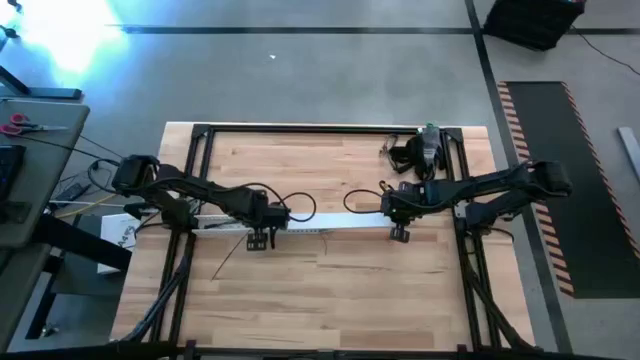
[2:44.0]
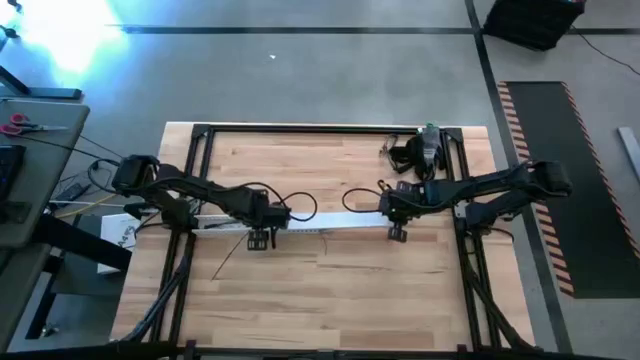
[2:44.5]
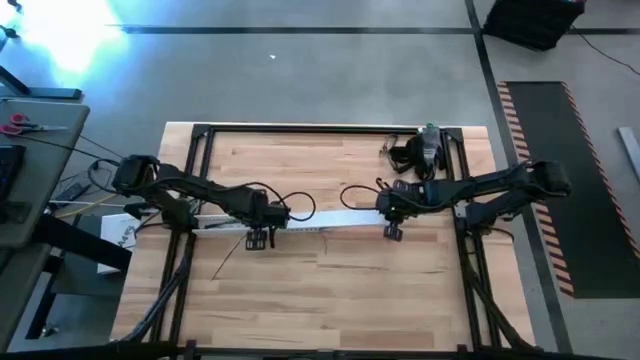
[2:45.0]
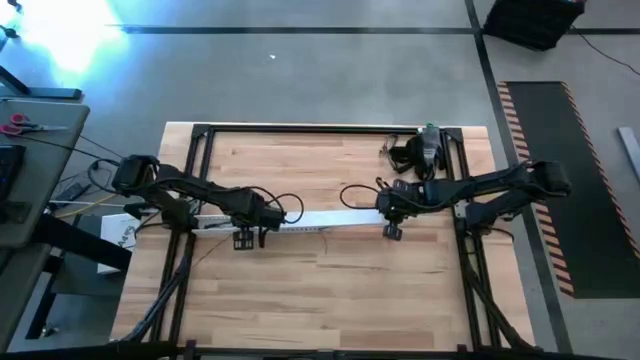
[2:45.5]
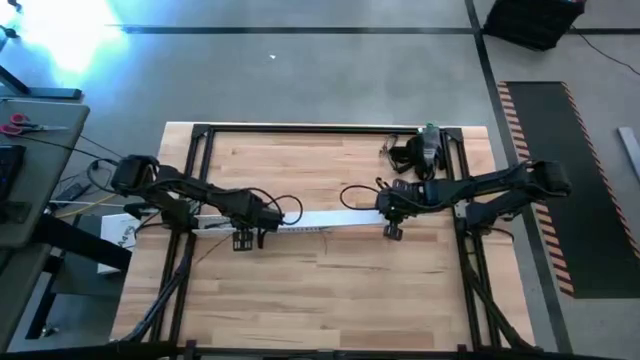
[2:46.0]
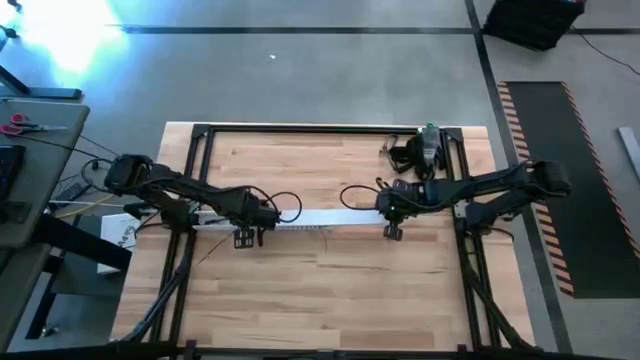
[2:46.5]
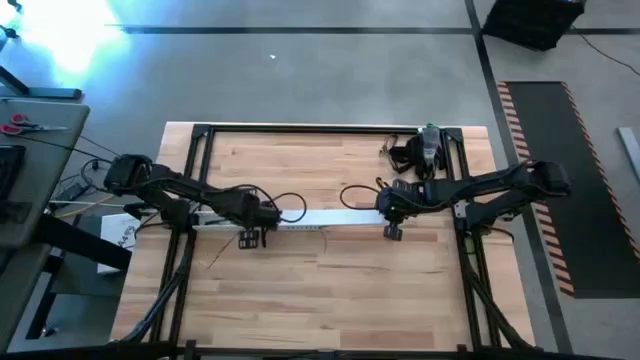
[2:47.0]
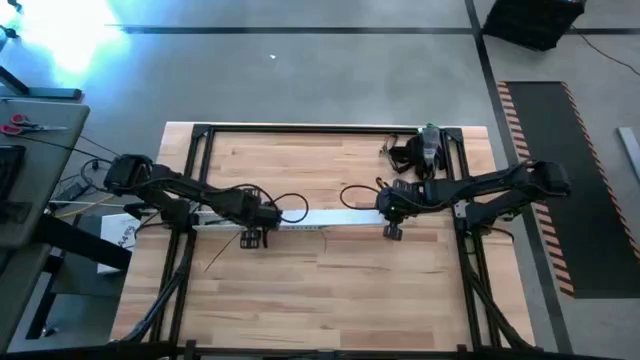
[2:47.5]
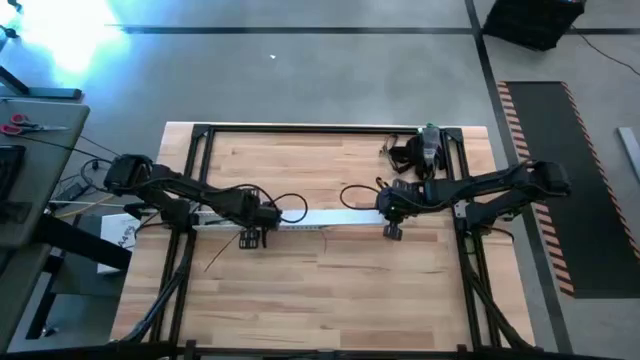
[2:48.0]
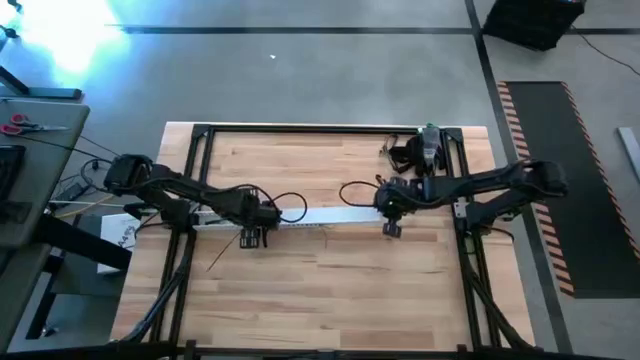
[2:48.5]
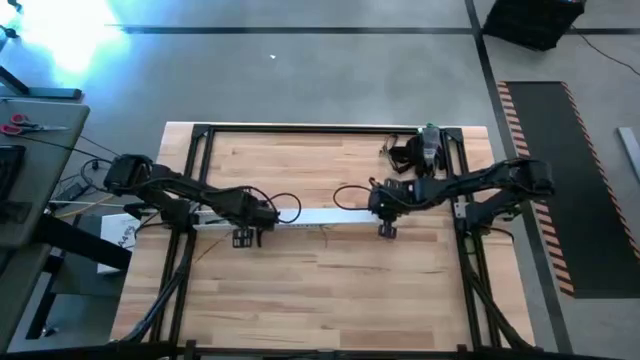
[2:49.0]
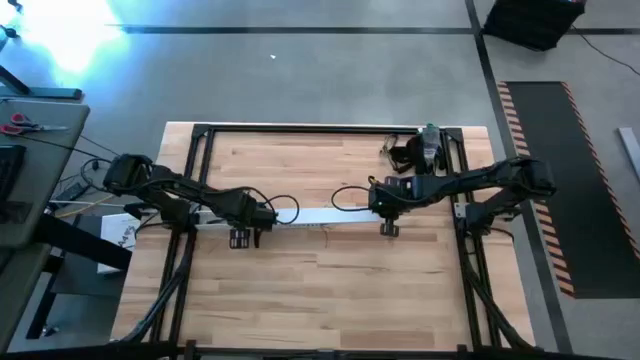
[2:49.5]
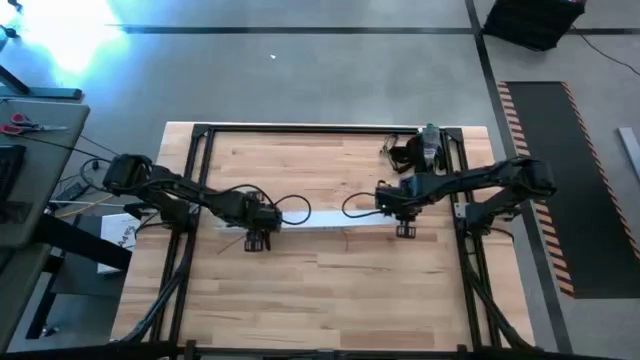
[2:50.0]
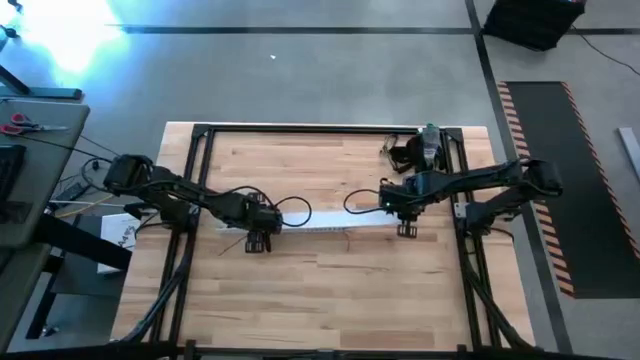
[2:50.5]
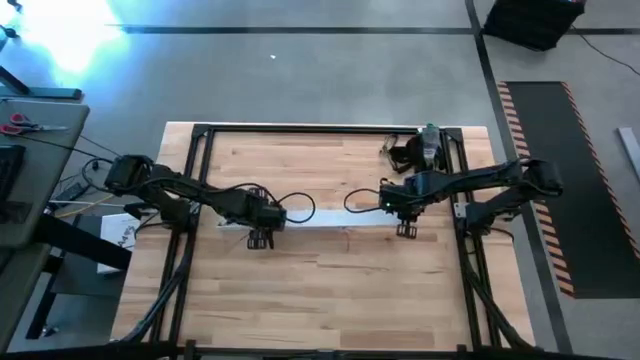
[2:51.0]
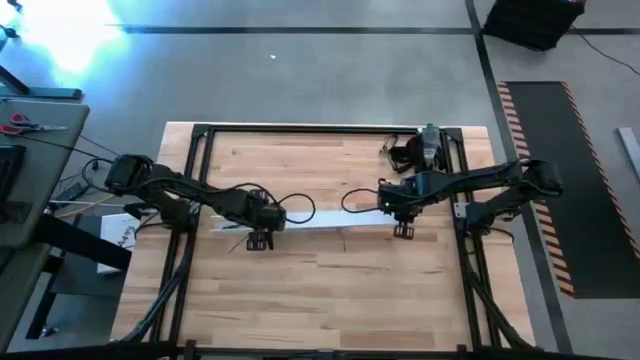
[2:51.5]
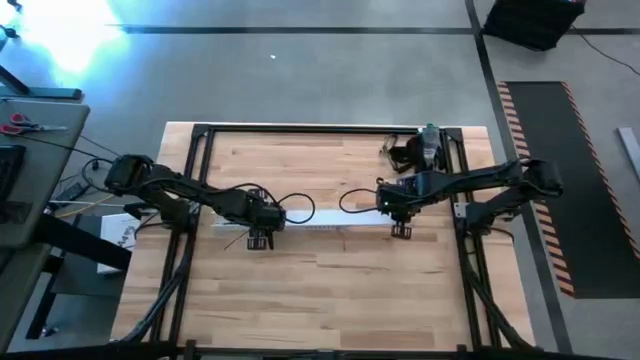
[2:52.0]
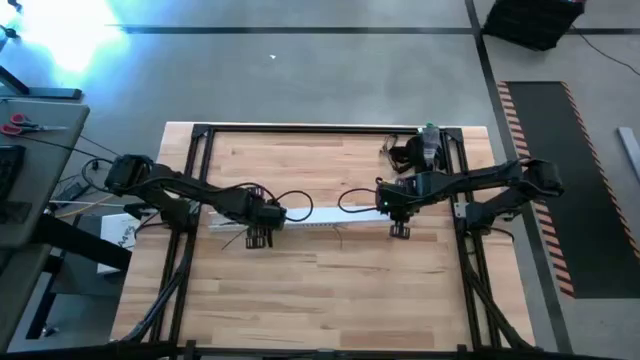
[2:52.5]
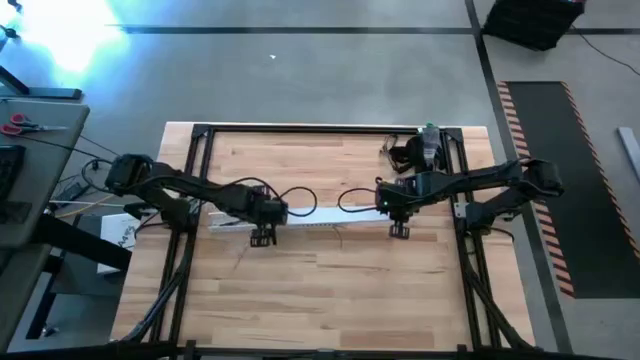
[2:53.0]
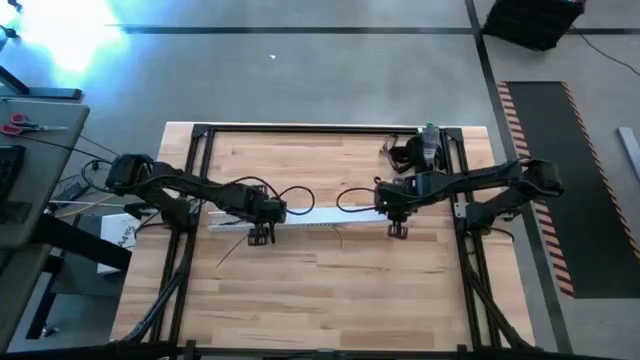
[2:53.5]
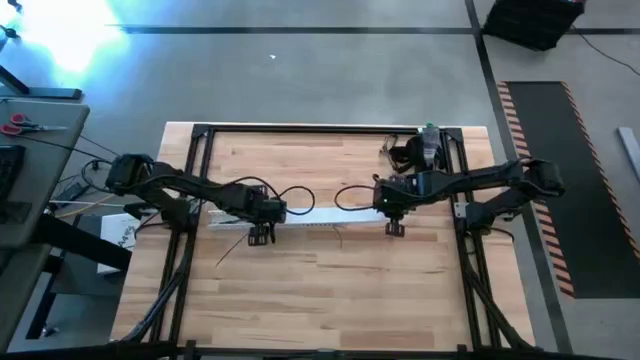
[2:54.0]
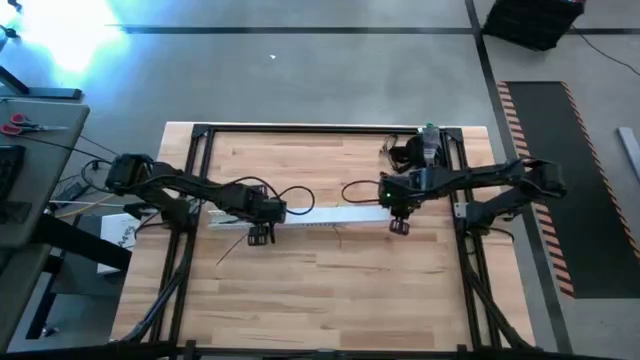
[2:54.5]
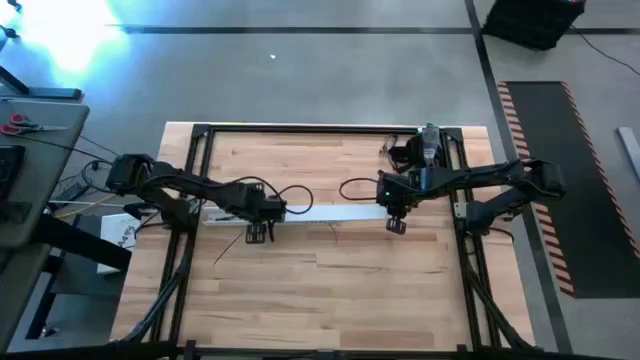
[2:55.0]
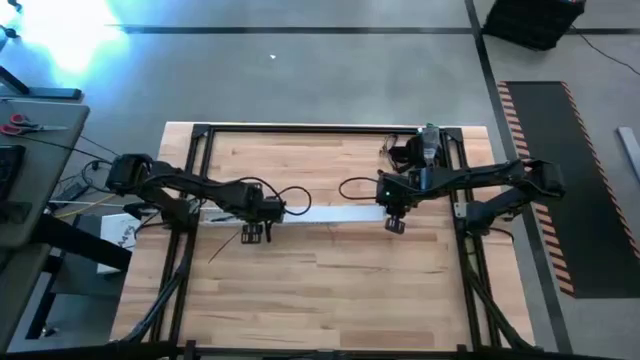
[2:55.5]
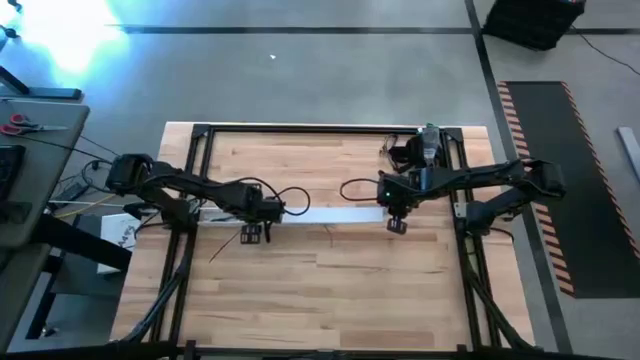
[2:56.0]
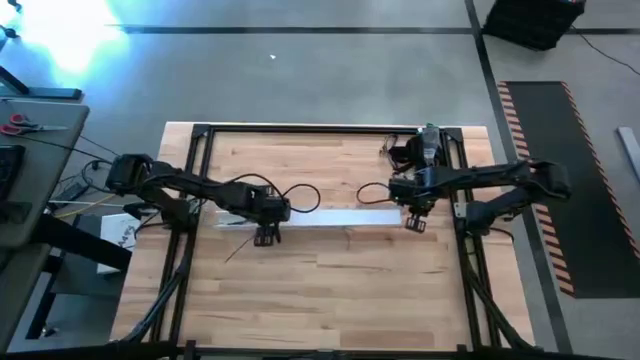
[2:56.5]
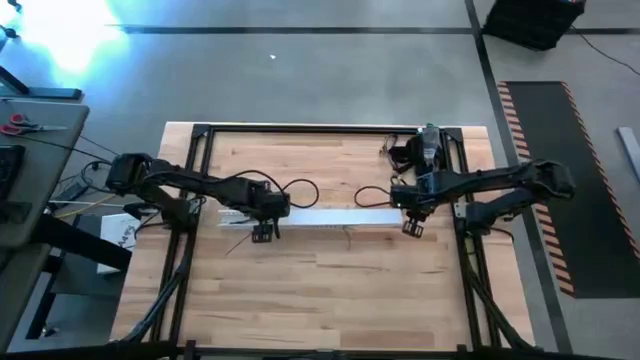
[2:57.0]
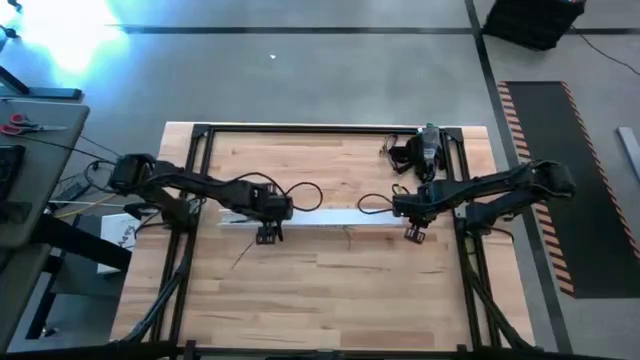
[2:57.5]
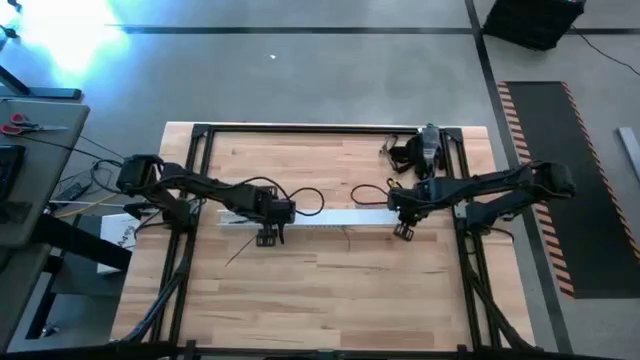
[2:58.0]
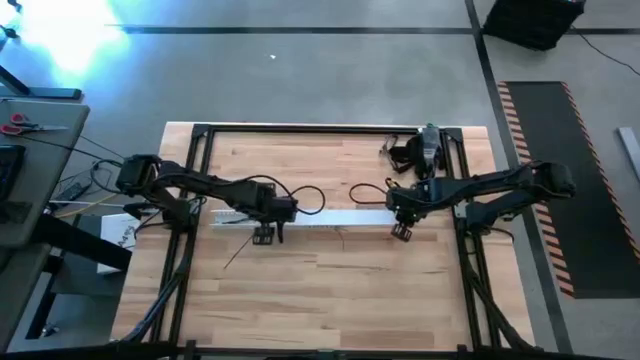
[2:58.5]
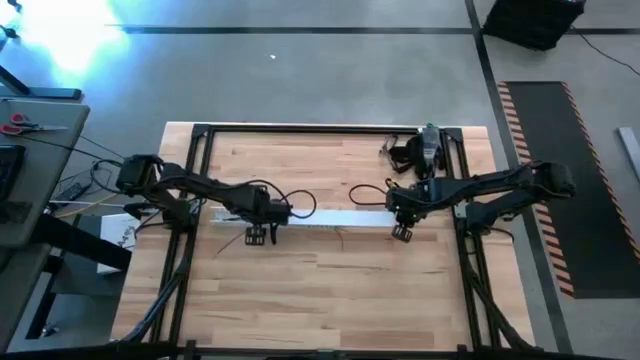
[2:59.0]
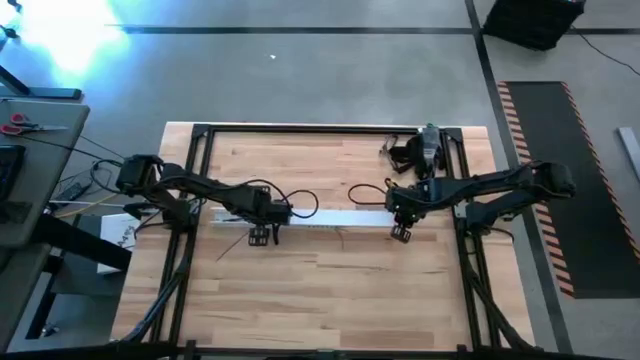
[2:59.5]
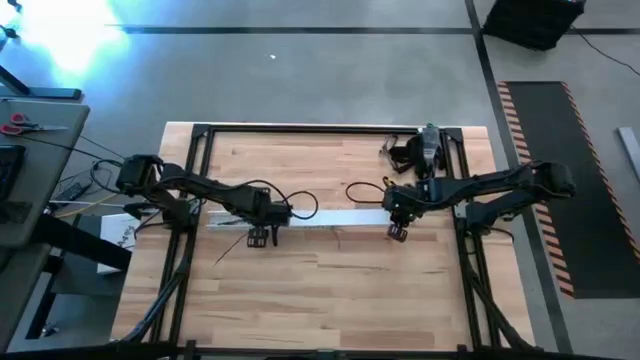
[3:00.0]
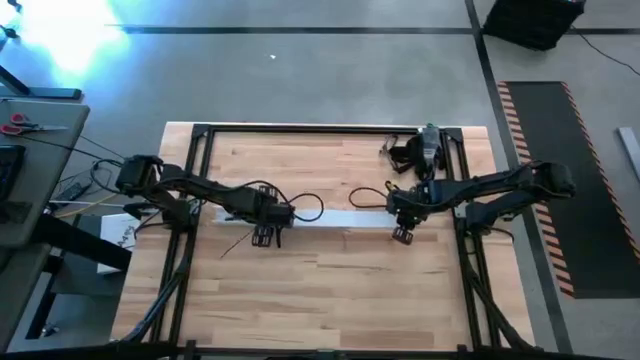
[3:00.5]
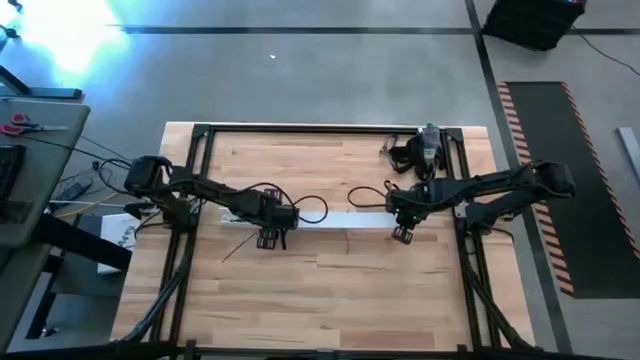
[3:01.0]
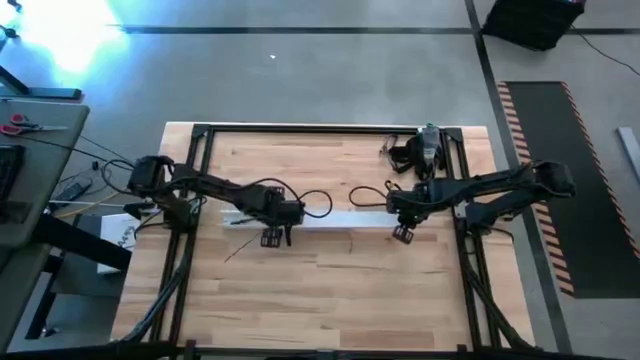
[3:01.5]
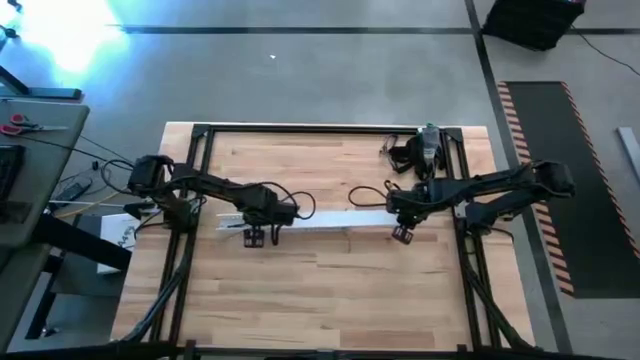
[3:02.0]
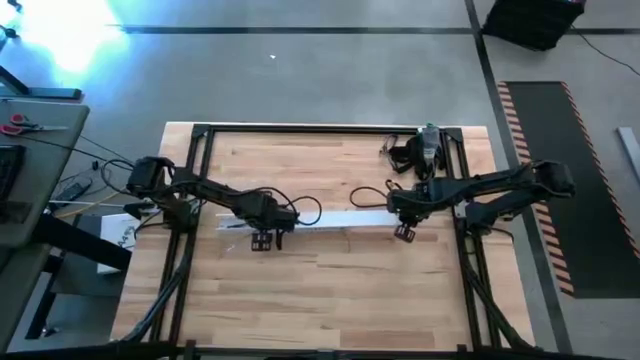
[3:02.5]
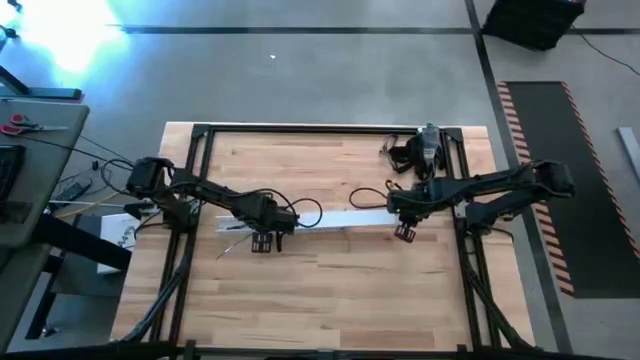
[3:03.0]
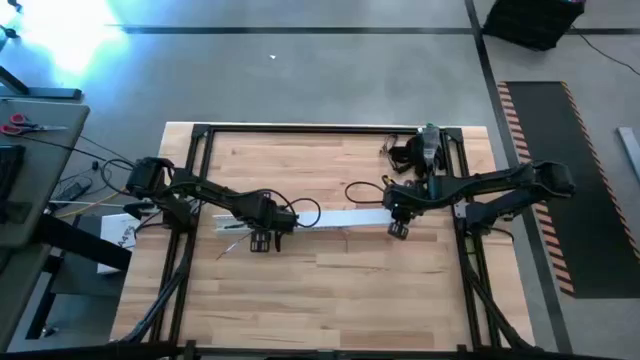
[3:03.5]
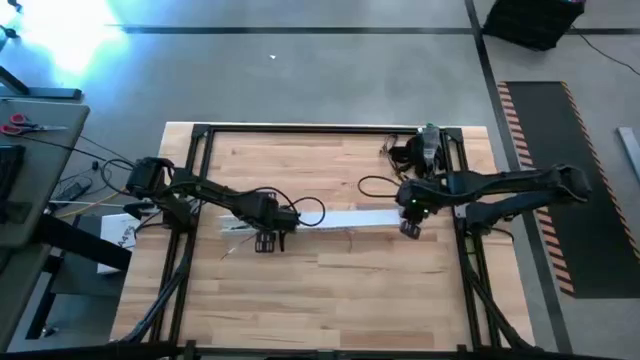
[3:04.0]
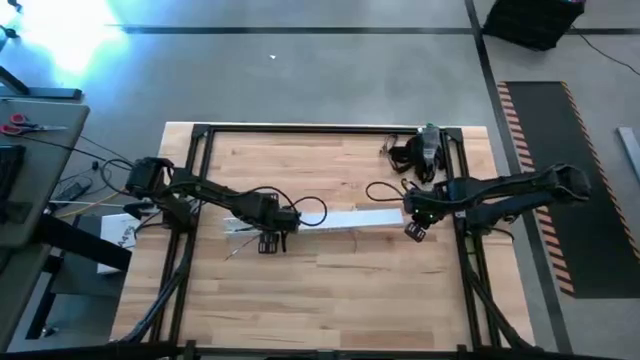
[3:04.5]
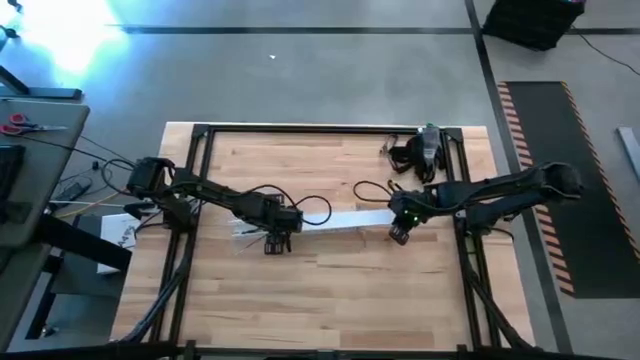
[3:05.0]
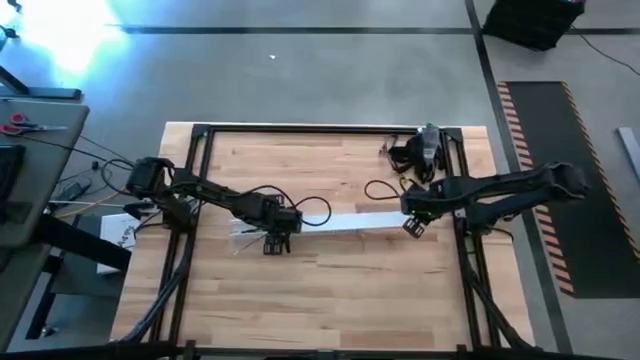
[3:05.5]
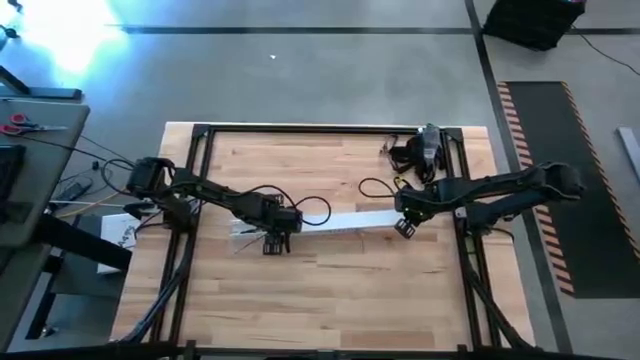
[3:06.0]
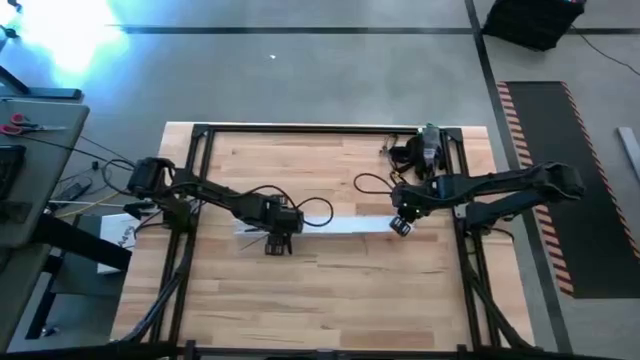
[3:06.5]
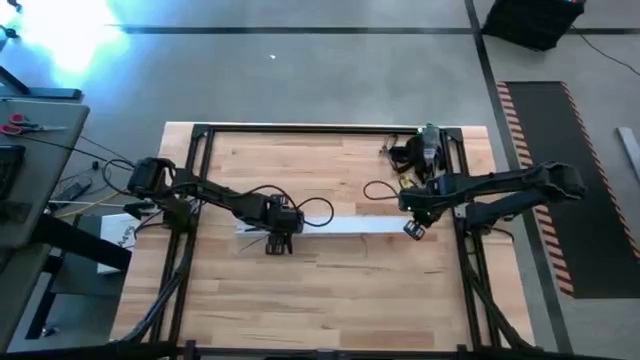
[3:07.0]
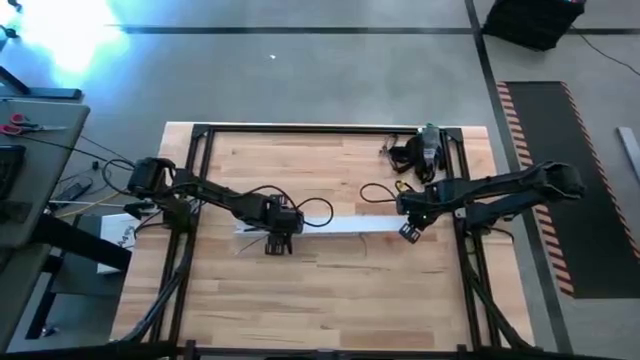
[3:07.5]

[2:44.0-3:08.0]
Task: Ziptie cables
Close the white cable duct
